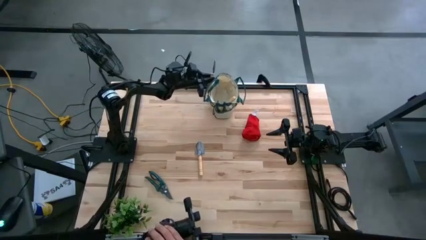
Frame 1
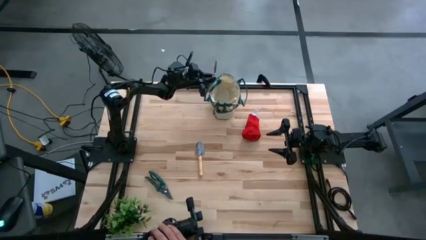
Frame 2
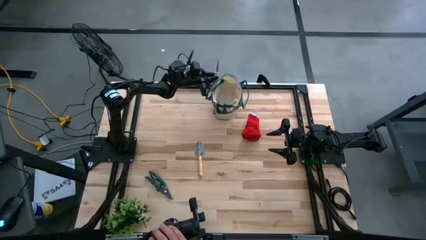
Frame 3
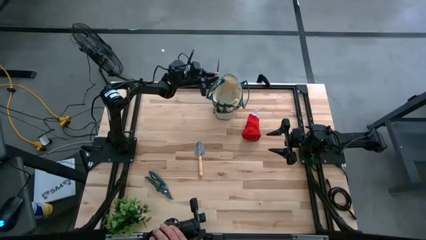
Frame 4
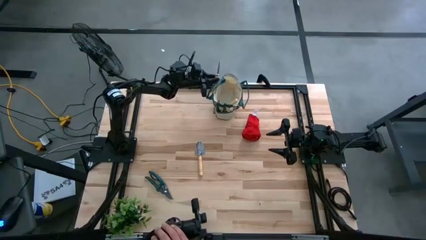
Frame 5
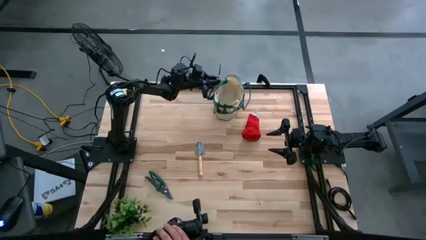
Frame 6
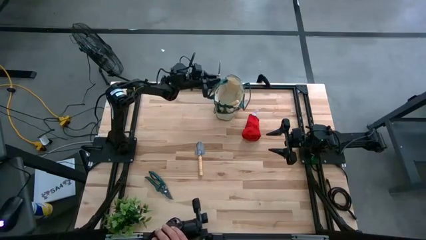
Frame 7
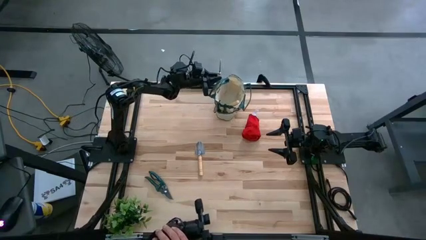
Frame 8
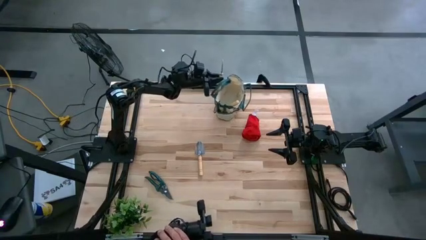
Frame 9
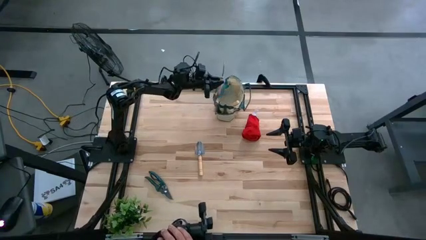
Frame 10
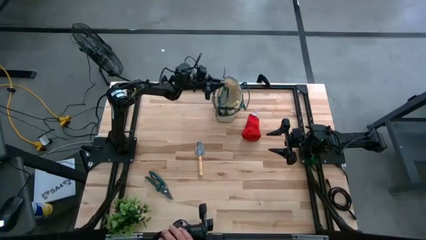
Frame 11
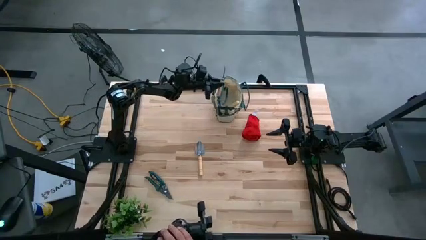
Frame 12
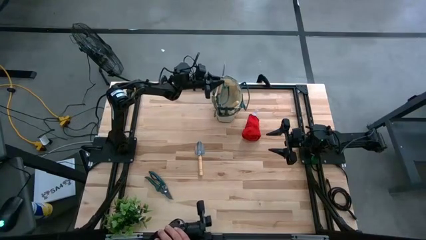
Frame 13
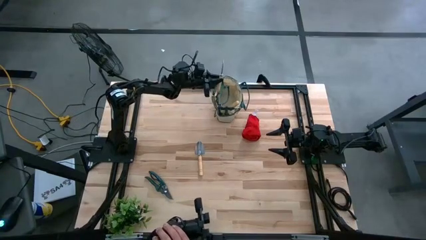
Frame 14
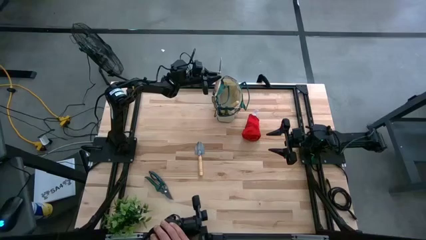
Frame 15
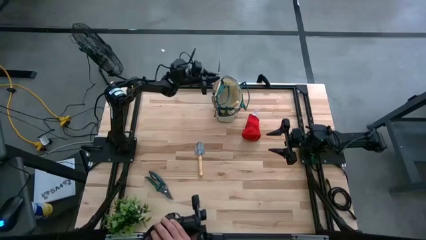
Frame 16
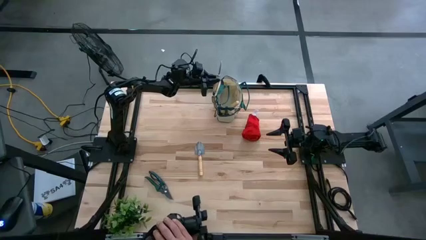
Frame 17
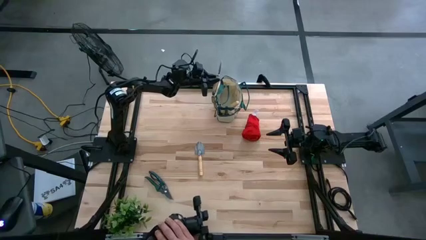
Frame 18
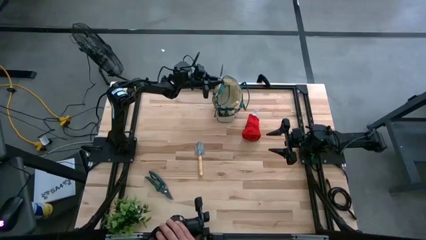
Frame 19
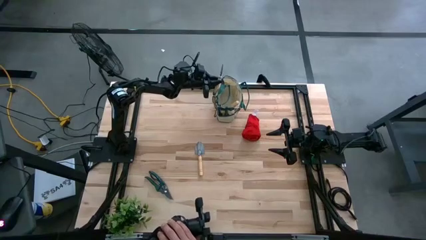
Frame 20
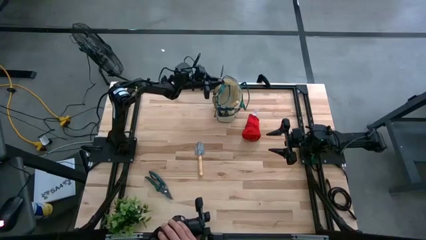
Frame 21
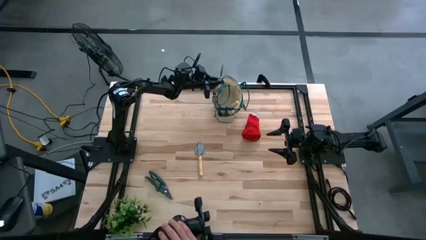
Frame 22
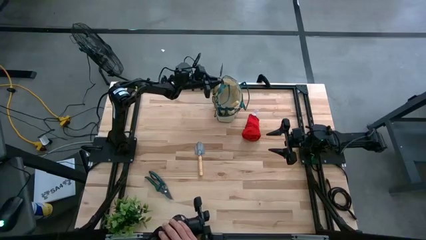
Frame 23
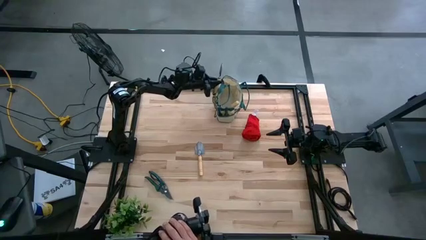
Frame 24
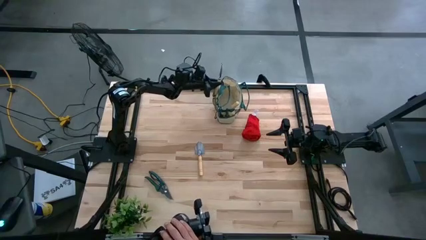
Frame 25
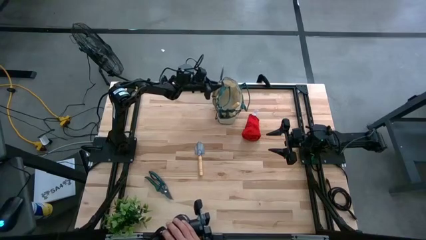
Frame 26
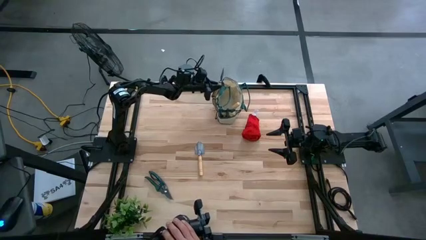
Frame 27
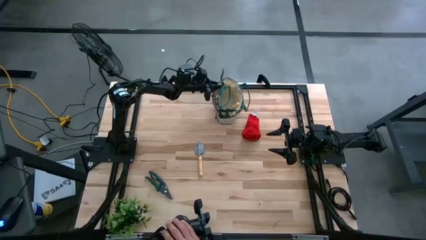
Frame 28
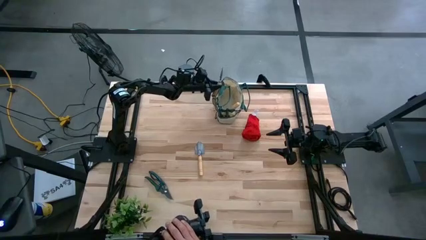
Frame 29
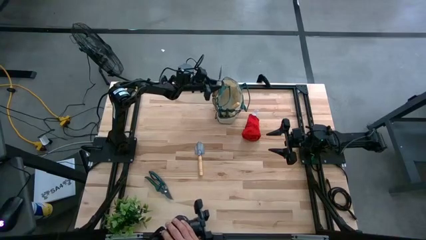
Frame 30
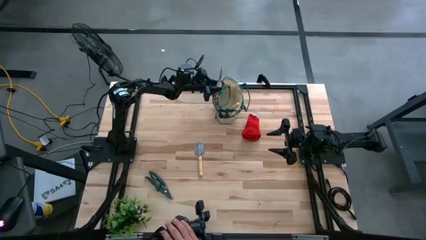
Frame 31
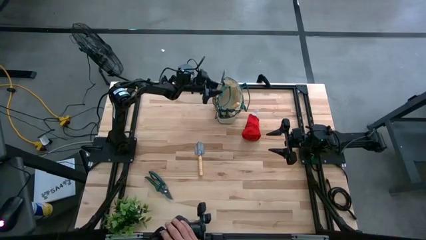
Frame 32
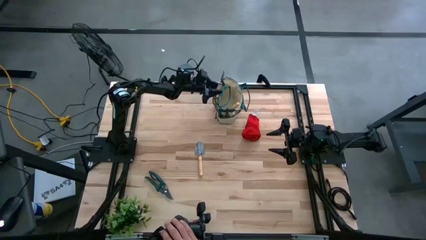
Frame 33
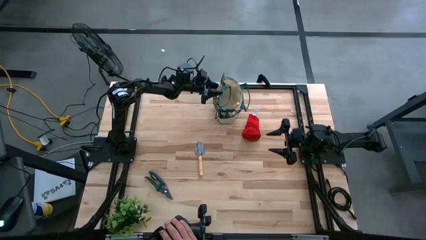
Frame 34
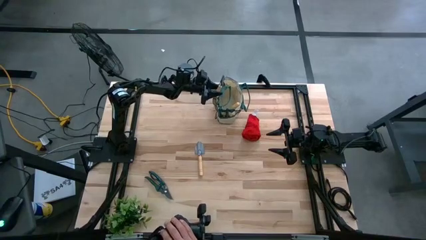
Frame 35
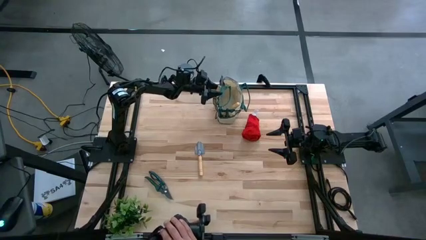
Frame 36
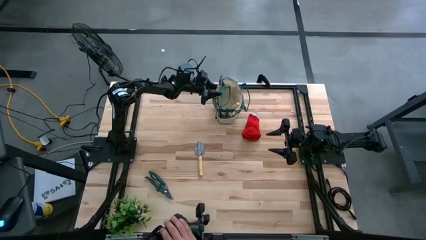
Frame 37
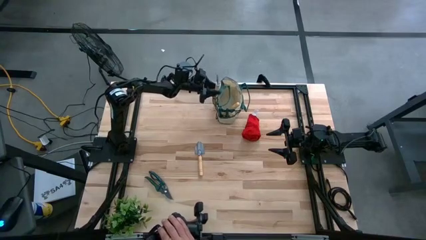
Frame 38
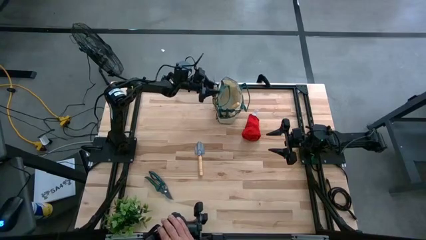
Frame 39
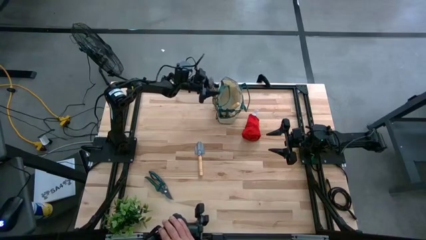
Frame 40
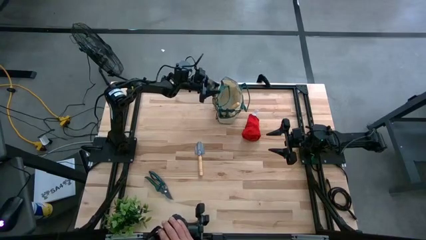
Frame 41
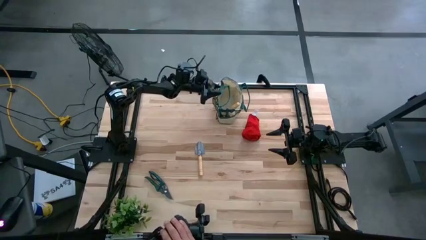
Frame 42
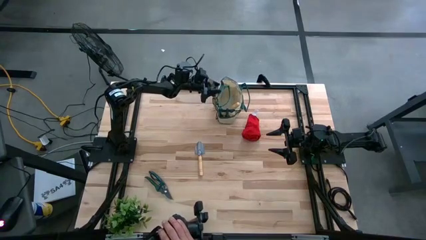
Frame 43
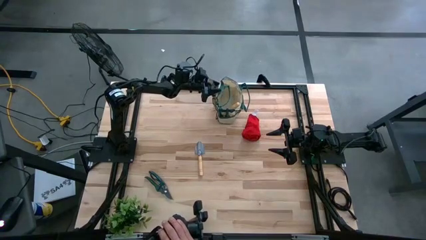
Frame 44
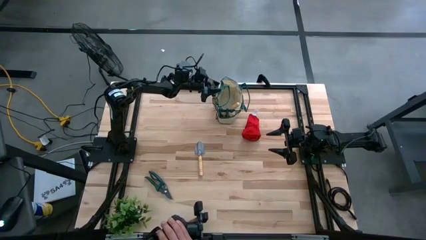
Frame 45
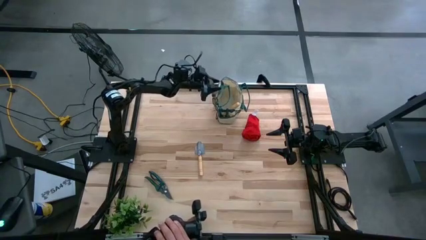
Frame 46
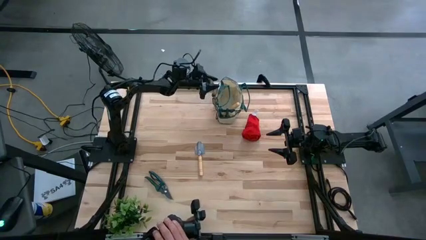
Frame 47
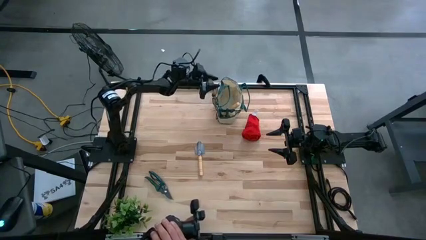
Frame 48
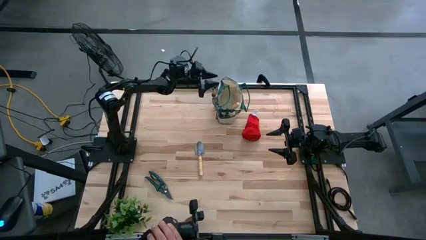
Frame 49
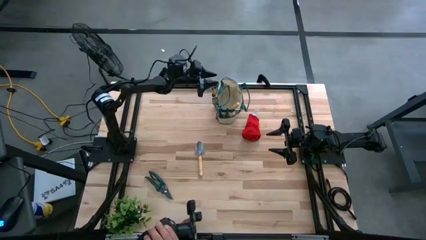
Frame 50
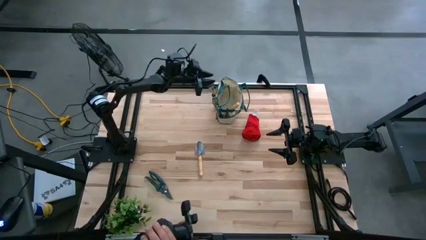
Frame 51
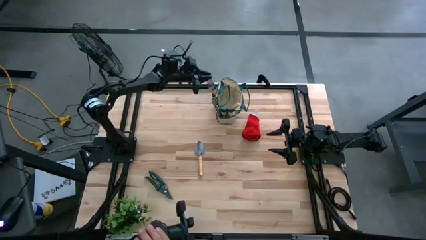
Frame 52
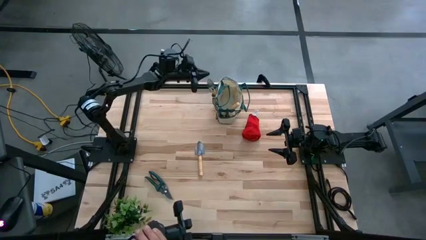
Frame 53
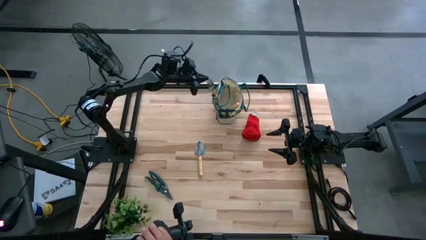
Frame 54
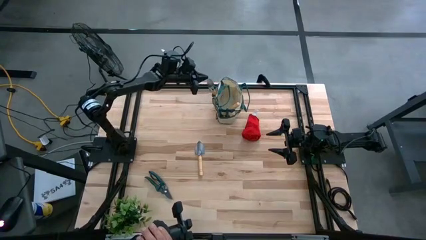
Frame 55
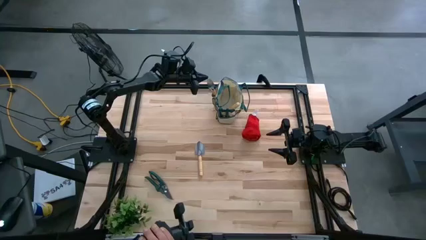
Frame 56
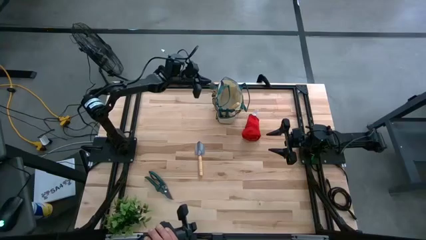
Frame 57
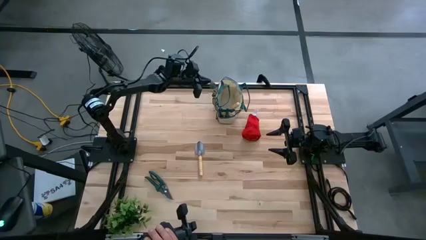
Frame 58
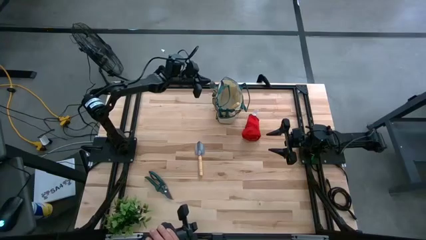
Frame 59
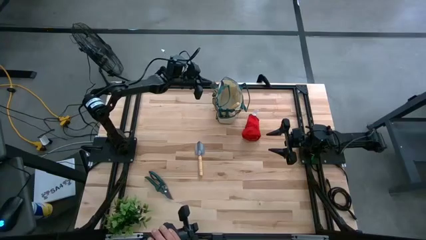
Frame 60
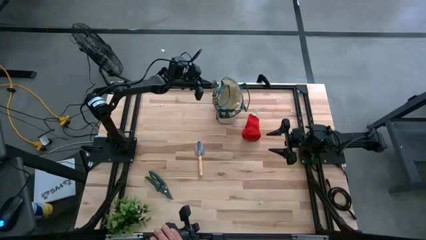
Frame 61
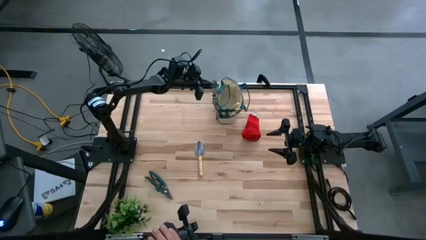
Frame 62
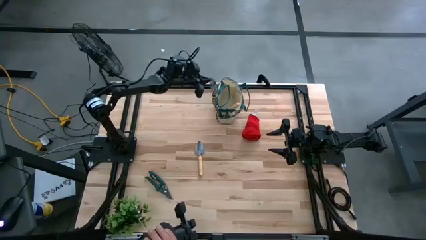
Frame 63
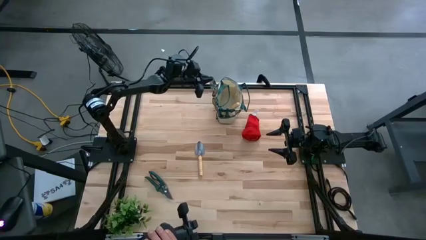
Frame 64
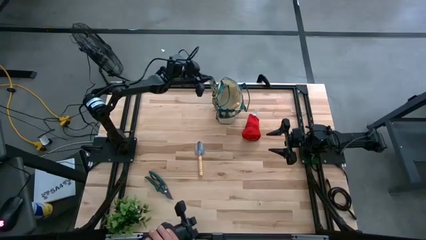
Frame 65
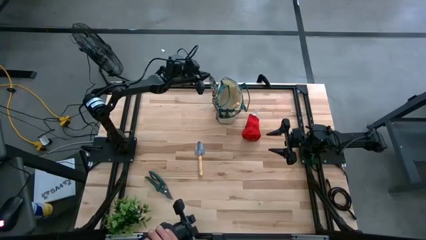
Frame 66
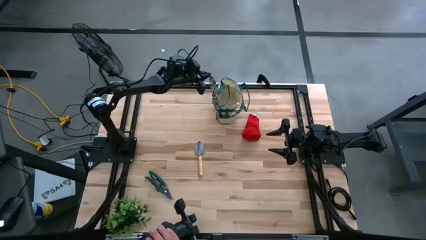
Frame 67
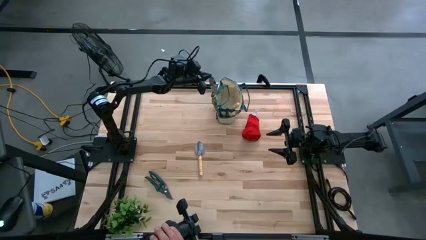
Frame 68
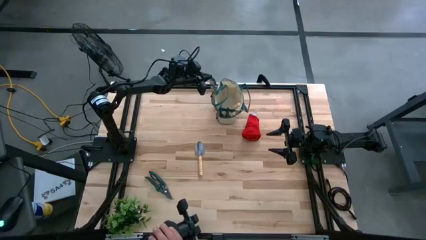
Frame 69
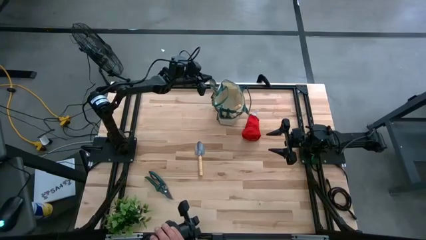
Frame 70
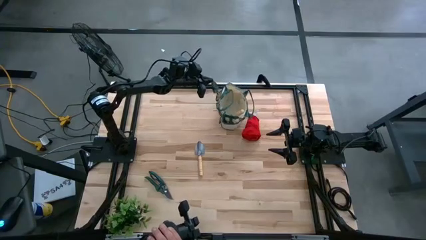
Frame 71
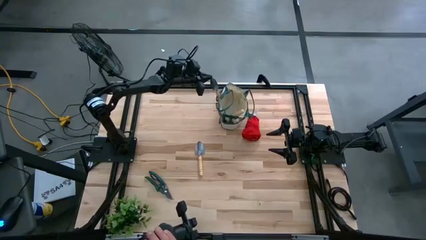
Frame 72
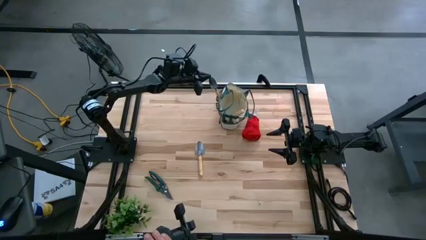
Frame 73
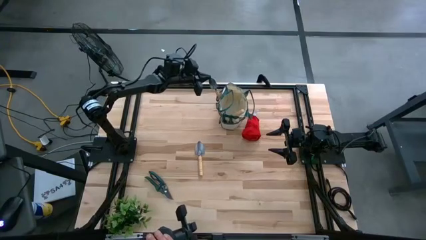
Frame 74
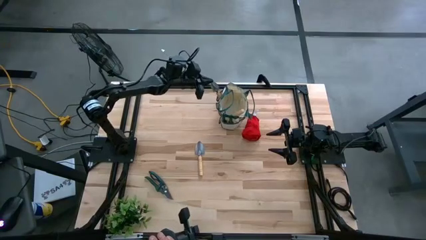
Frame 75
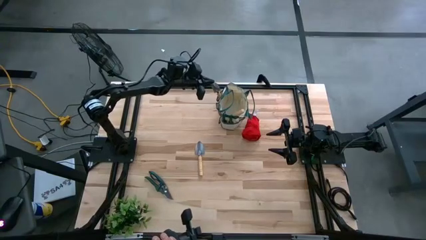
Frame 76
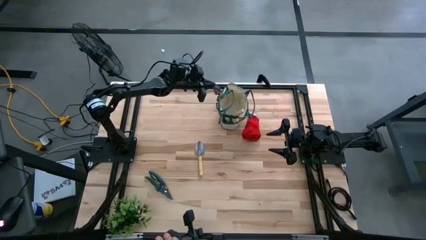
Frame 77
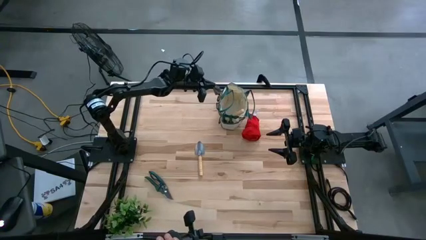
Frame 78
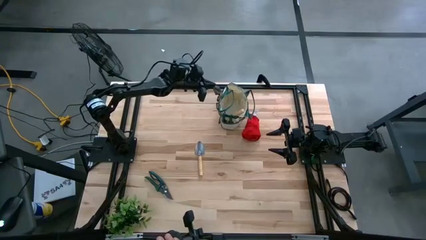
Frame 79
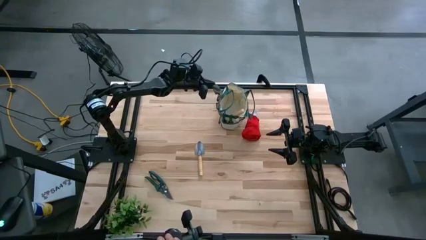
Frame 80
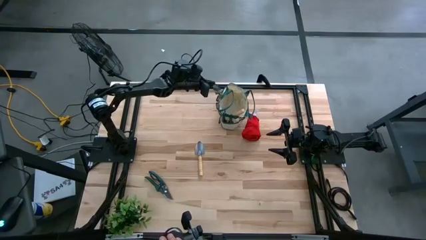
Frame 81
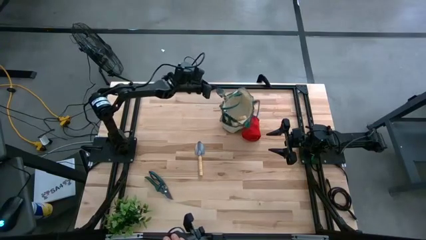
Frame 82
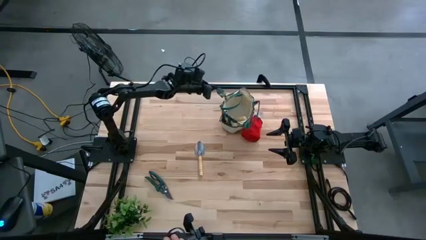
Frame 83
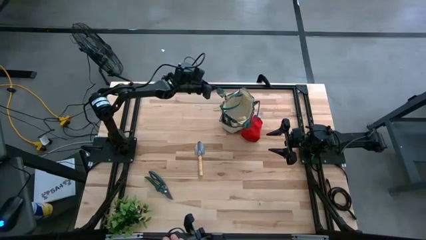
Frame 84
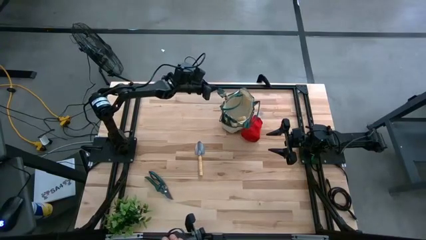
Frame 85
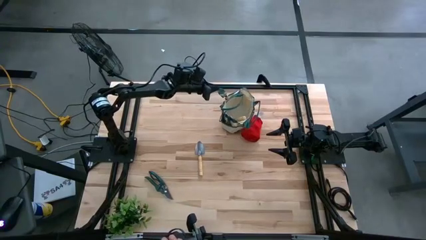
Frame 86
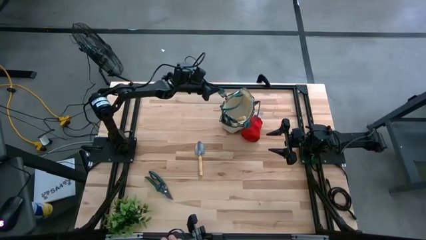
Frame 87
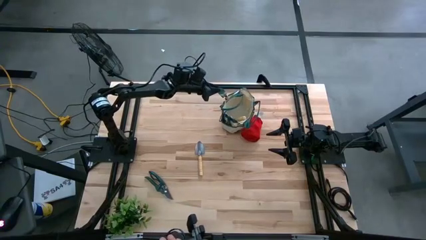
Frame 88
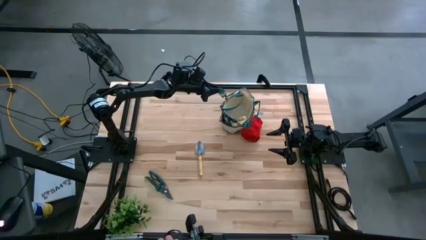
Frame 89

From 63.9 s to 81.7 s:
Task: Pick & Place Garden tools in Gardening bag
Put the brown trowel into the gardening bag
